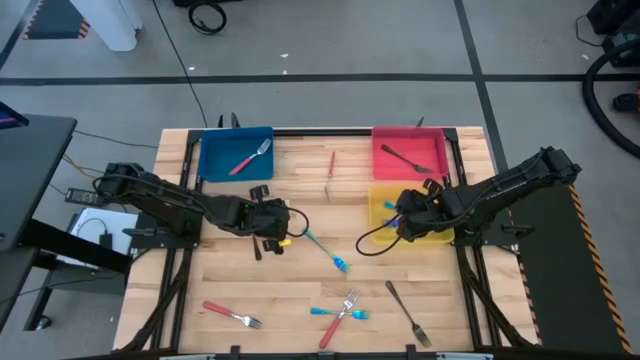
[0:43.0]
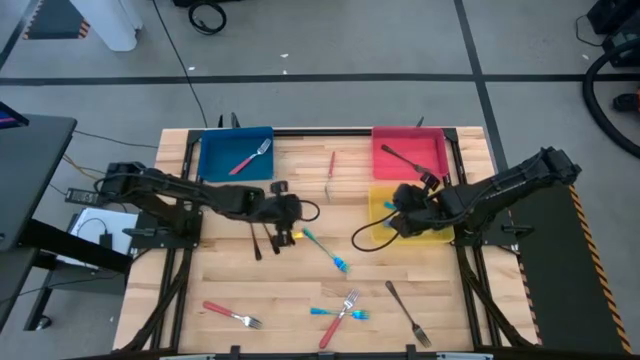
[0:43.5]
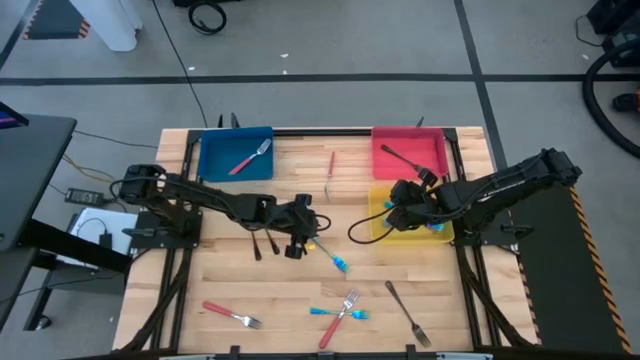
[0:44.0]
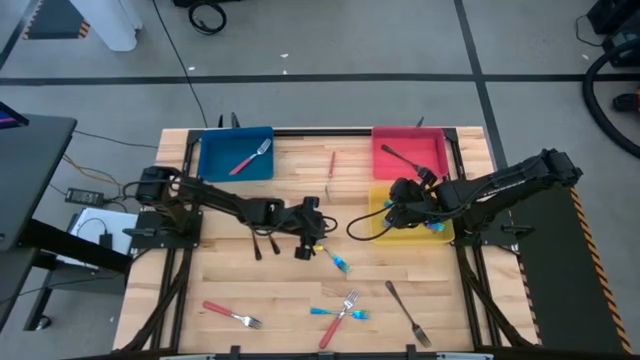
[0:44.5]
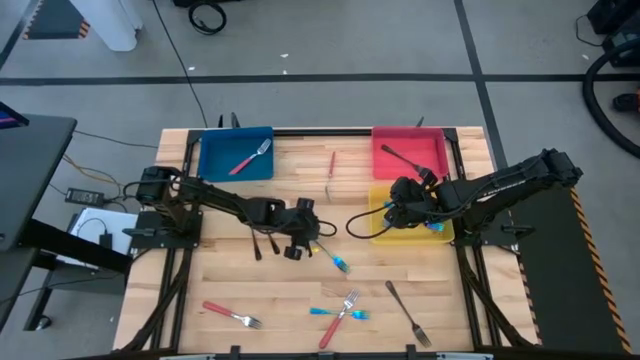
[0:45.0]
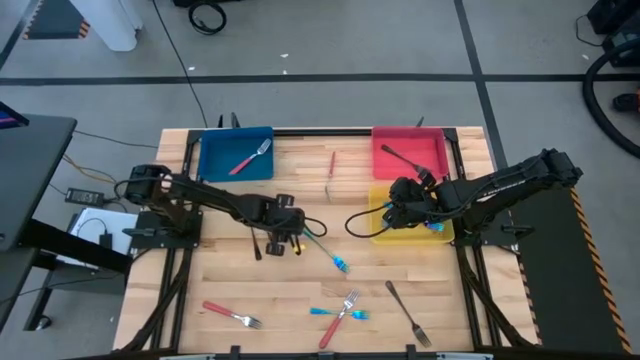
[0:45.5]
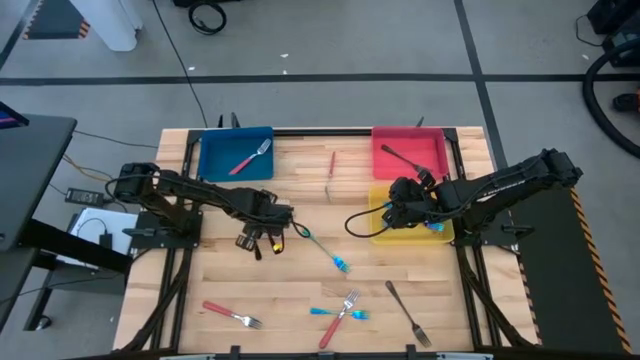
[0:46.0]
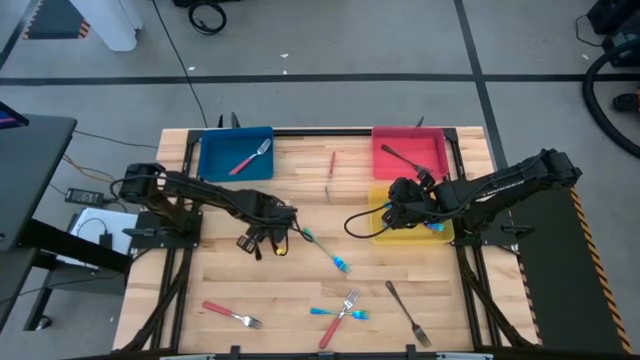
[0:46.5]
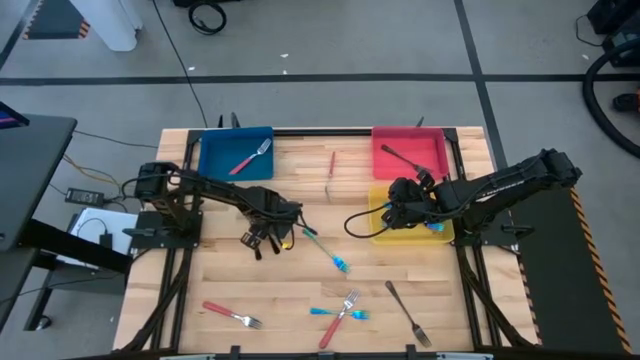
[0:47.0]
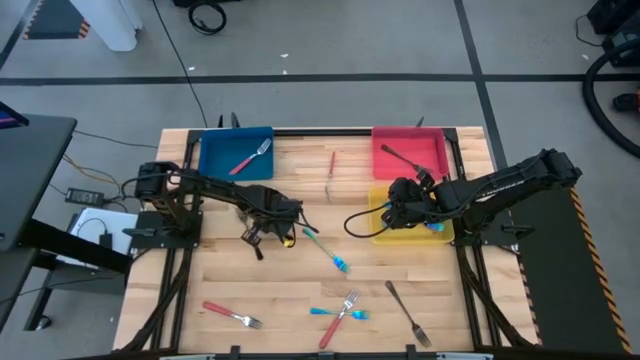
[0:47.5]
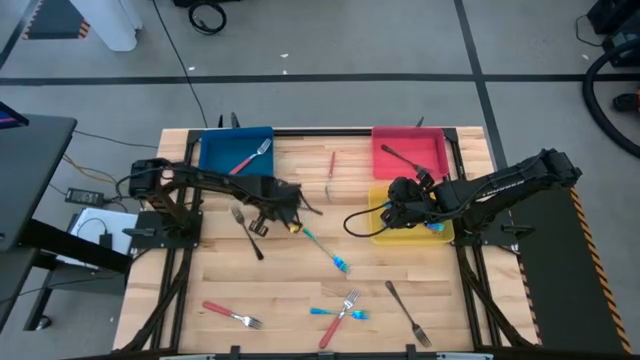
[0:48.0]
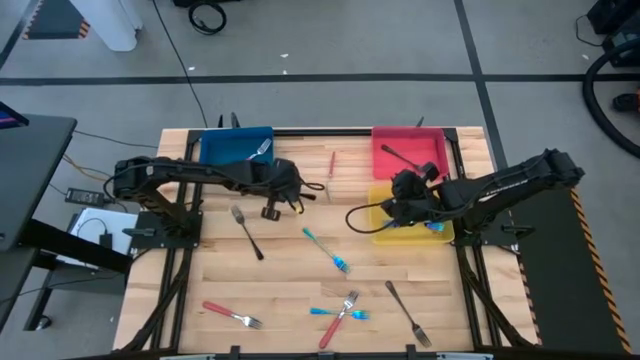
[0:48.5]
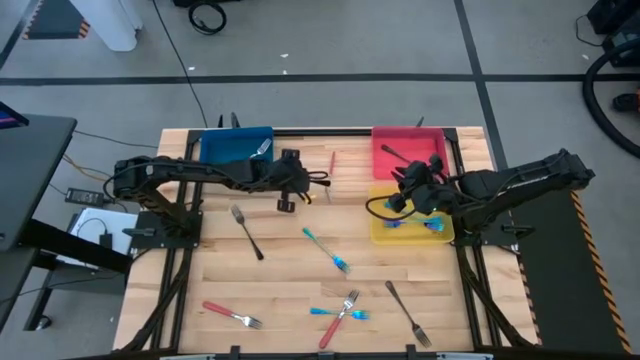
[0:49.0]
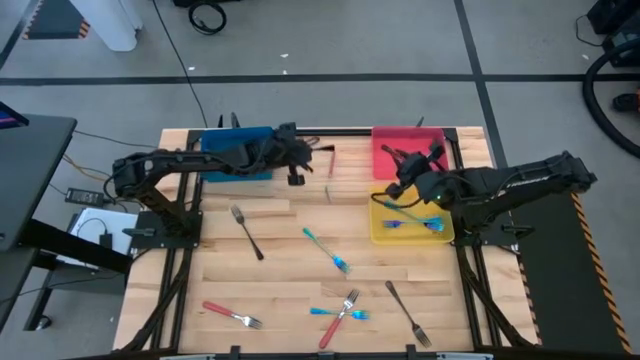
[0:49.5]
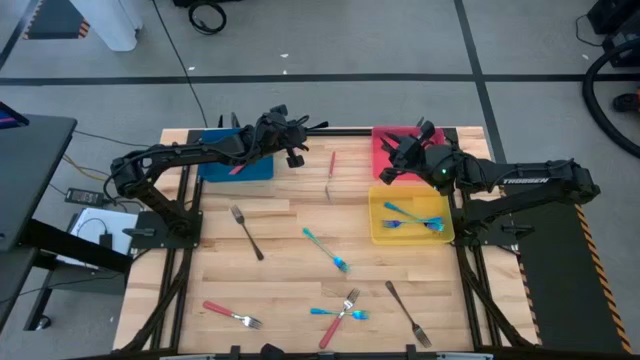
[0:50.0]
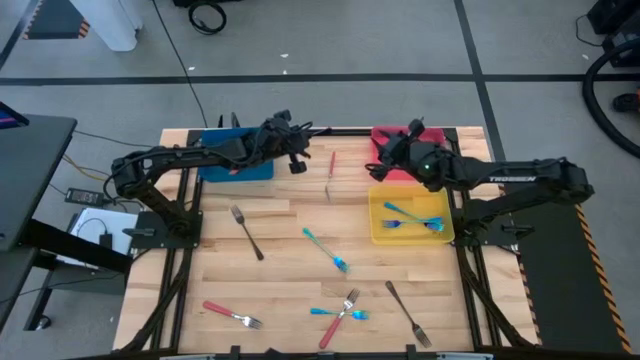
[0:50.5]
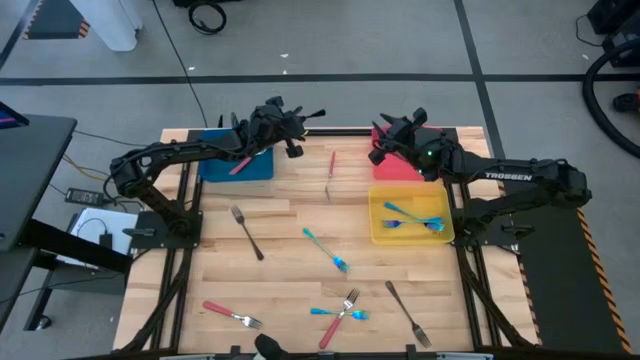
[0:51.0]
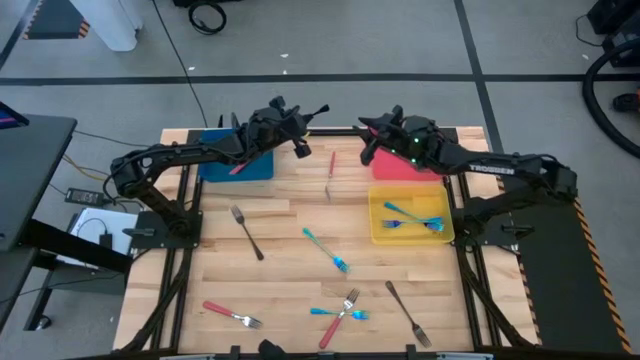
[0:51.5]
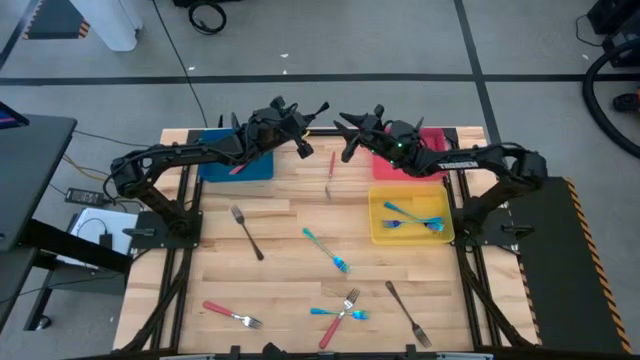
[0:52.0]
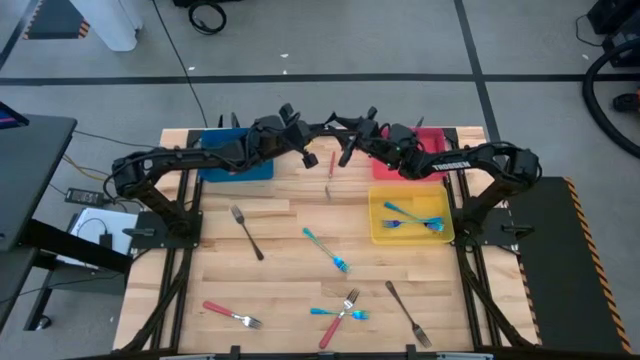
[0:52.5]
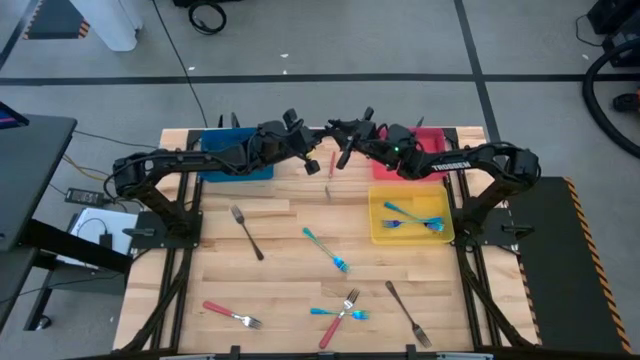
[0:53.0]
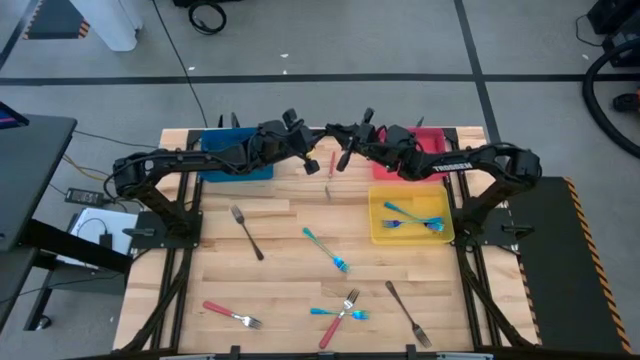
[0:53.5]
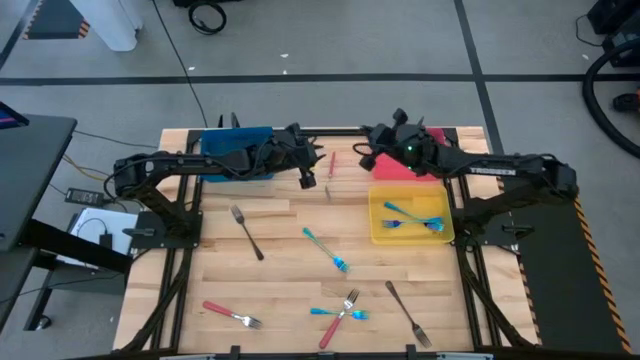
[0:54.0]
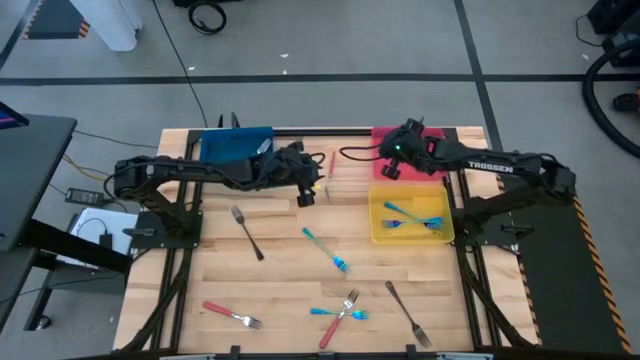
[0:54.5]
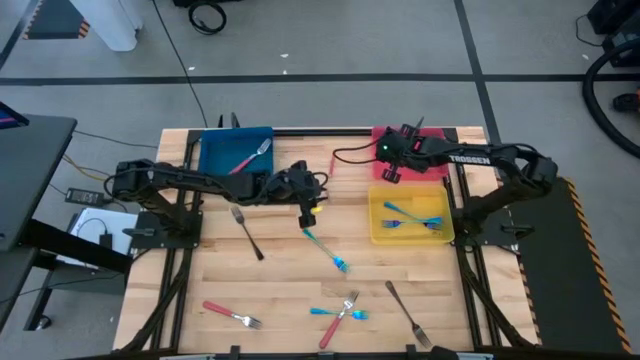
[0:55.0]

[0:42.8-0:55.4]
Task: Sort silverware by color (type)
Put the top right black fork into the red bin

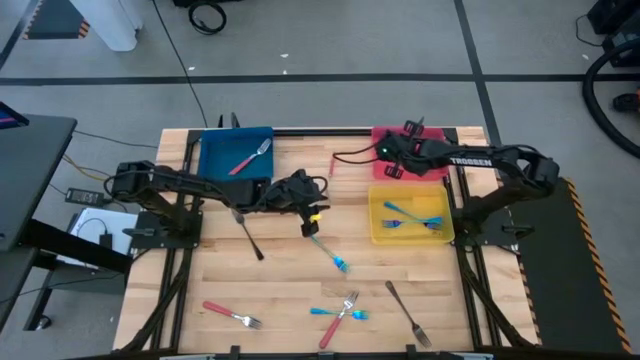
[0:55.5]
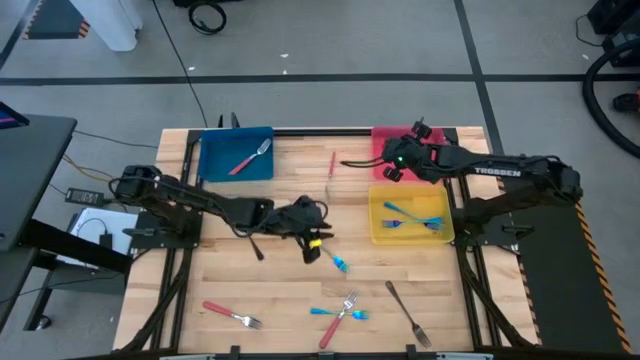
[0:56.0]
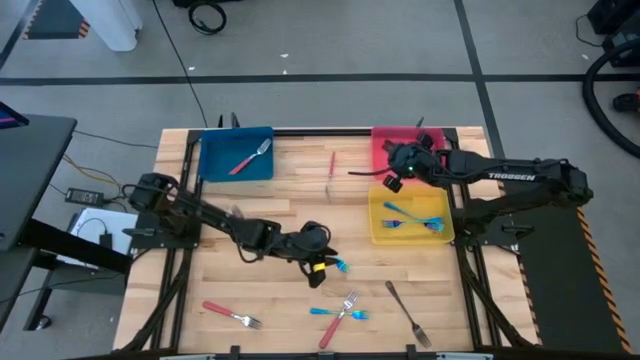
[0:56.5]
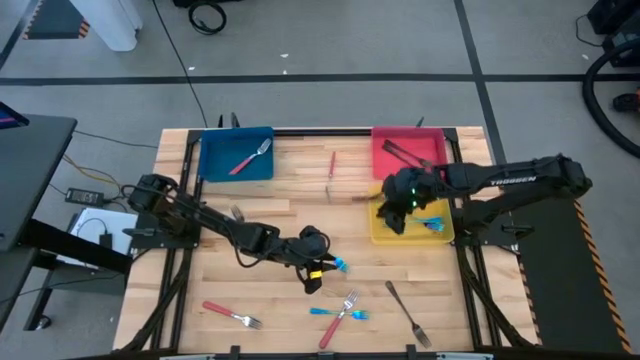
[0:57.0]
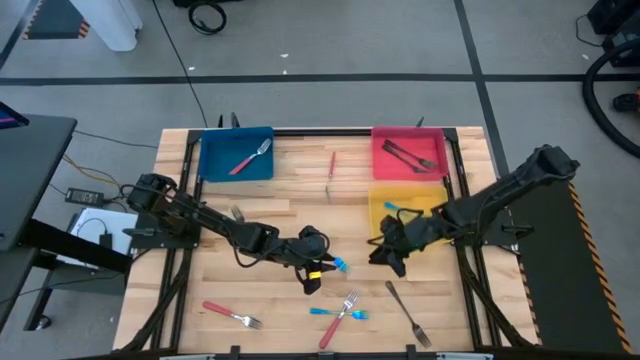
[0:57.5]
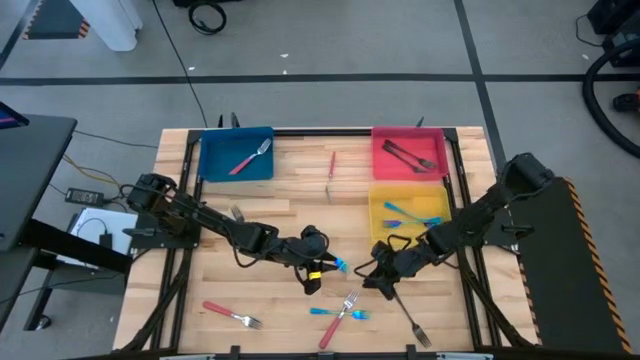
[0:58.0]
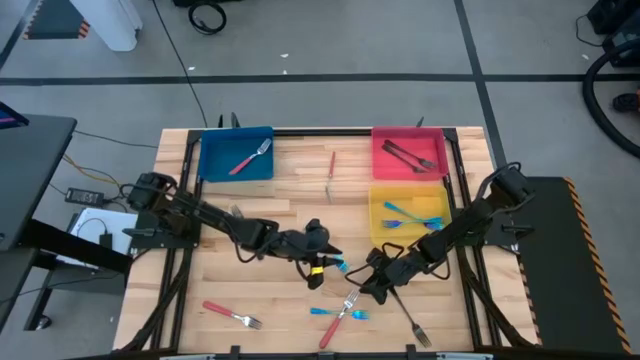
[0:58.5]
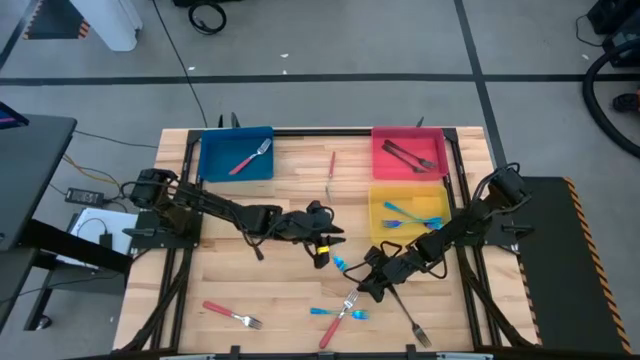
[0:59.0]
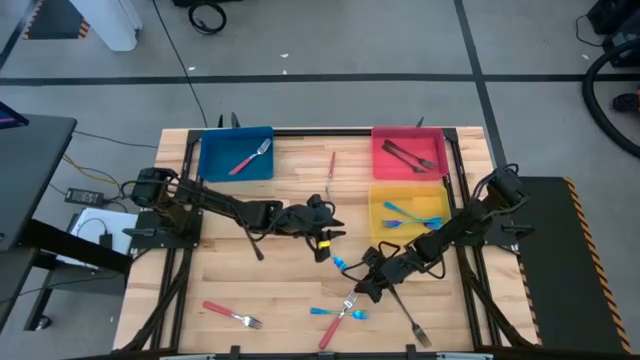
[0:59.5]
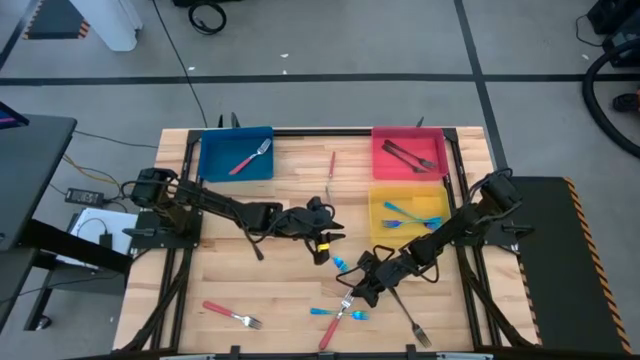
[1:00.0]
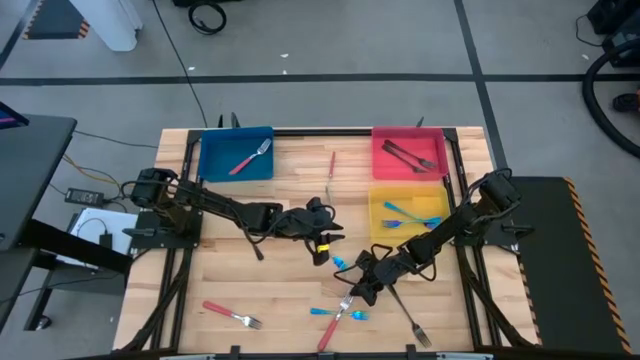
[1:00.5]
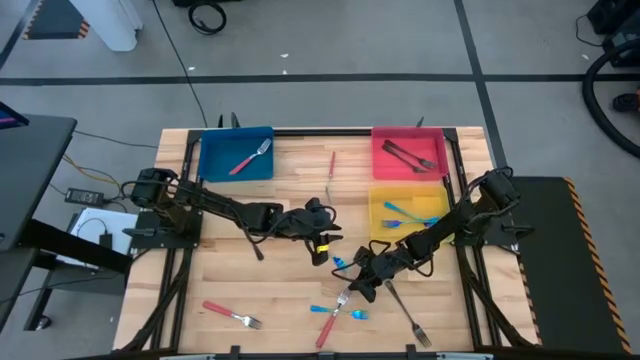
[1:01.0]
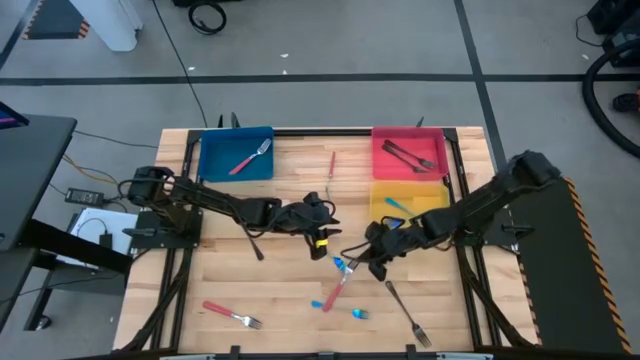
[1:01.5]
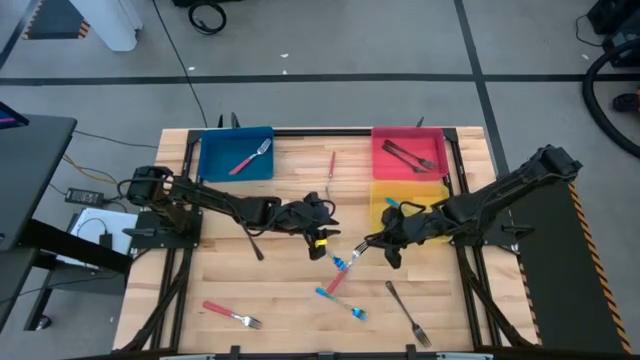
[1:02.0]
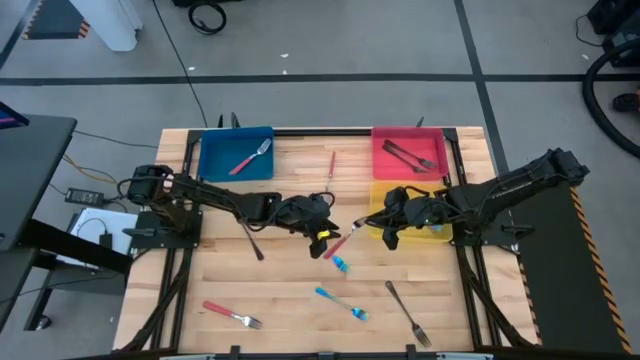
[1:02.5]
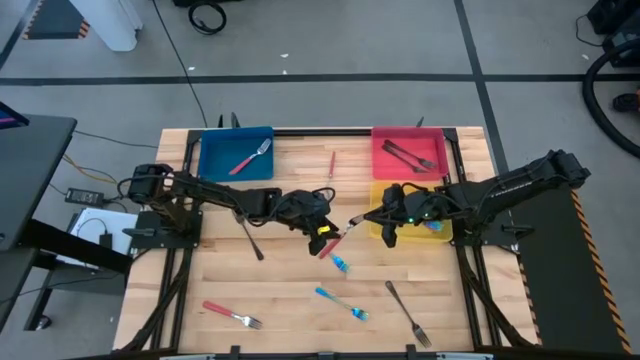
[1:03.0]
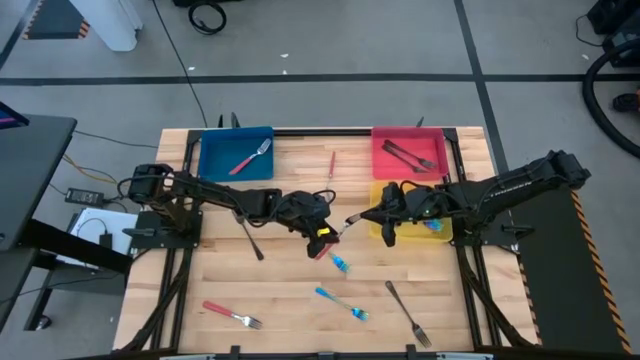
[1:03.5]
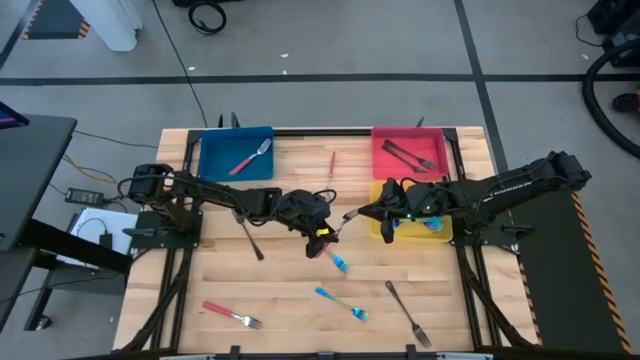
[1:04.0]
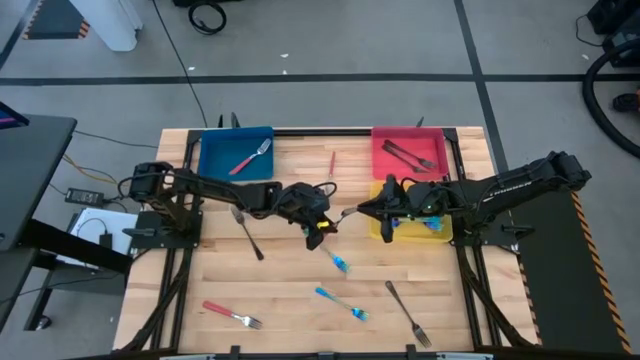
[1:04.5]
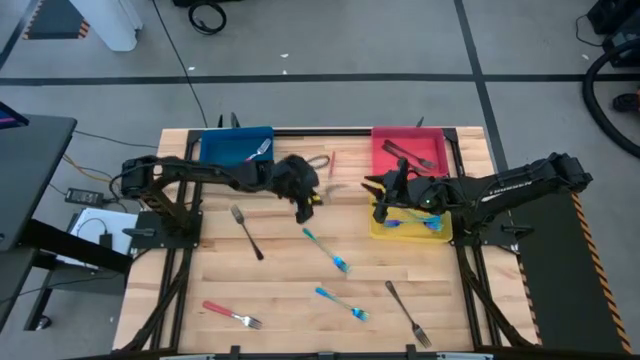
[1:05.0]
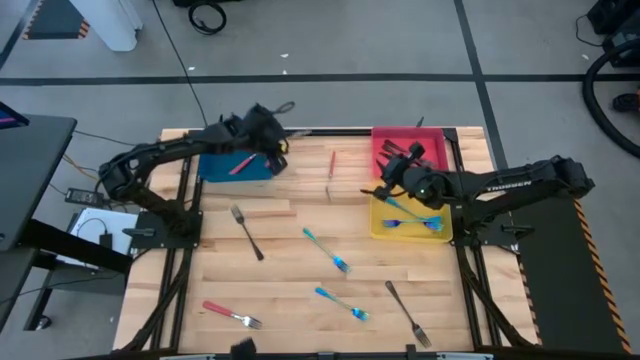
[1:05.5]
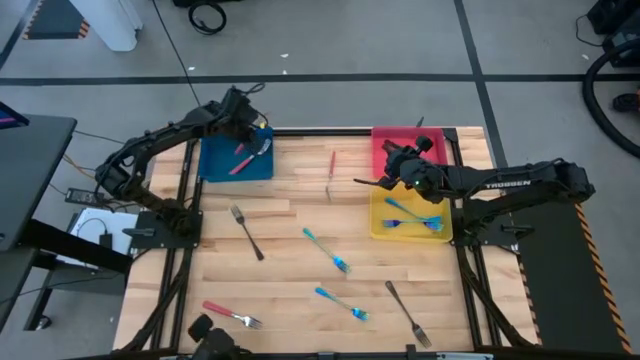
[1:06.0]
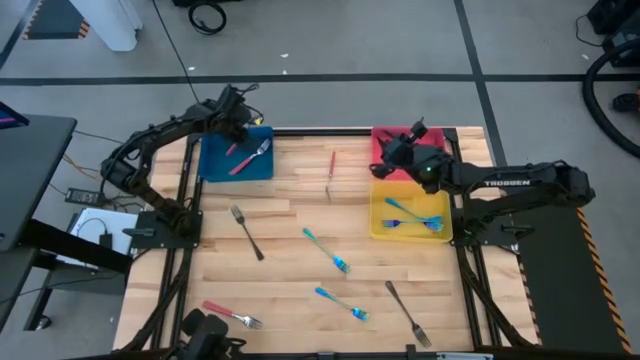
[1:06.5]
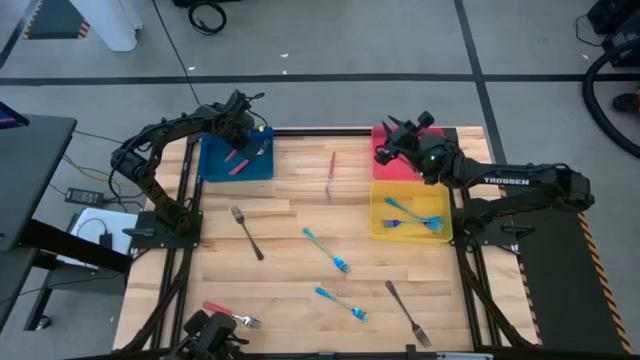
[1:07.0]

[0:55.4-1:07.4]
Put the bottom right pink fork into the blue bin
